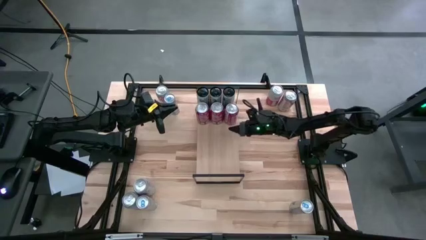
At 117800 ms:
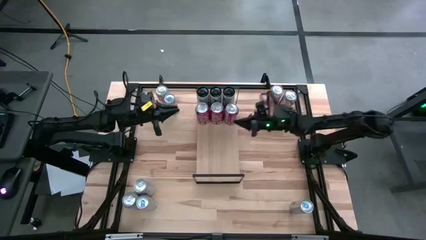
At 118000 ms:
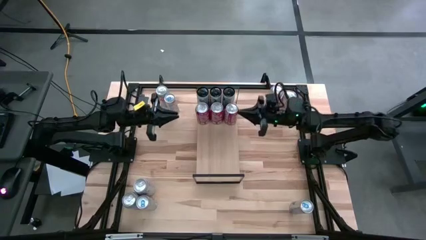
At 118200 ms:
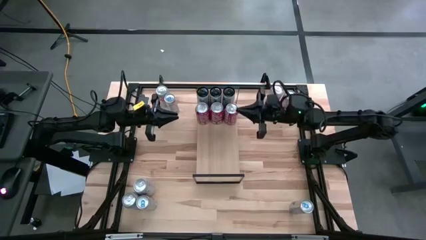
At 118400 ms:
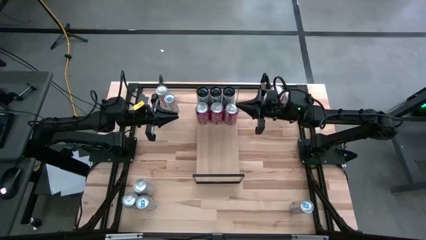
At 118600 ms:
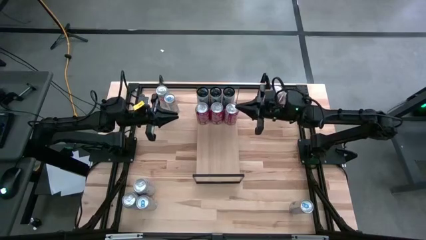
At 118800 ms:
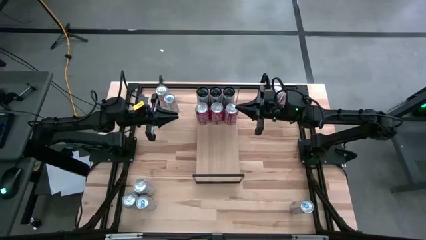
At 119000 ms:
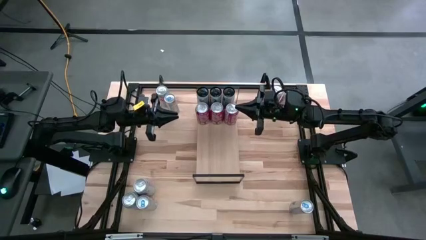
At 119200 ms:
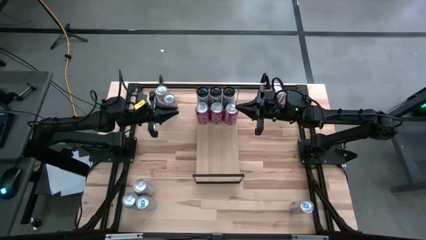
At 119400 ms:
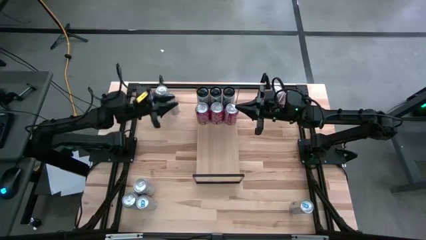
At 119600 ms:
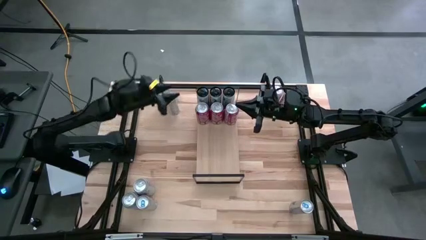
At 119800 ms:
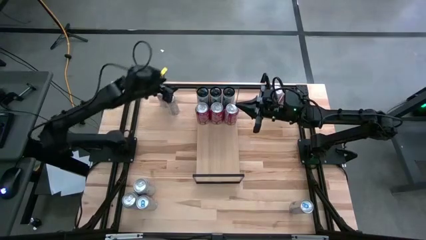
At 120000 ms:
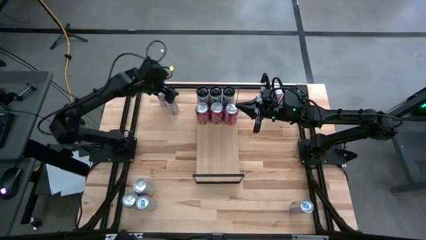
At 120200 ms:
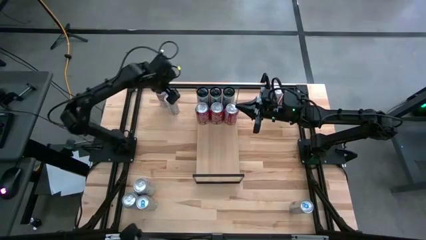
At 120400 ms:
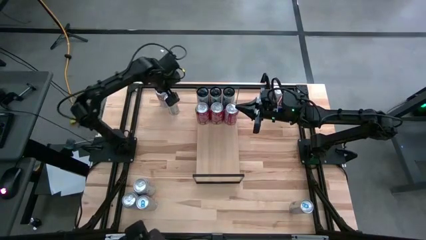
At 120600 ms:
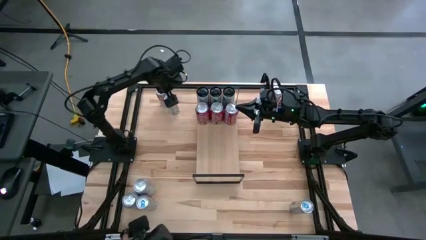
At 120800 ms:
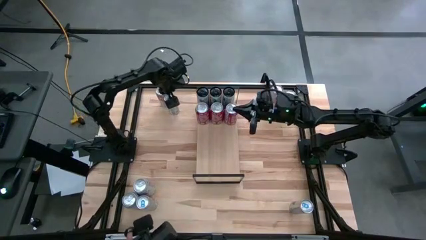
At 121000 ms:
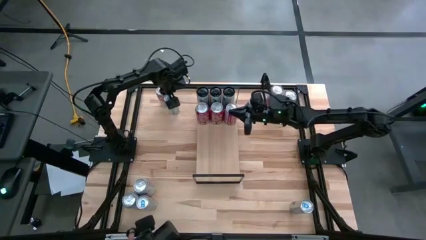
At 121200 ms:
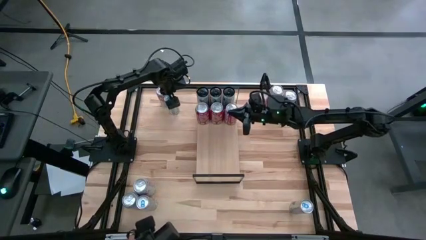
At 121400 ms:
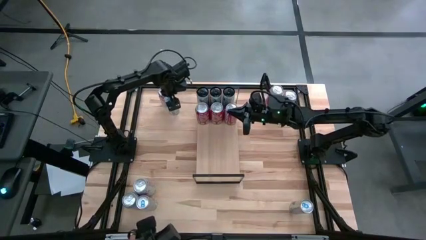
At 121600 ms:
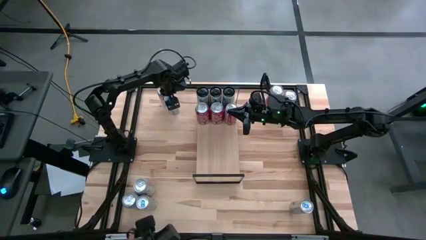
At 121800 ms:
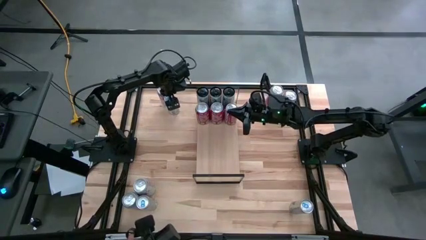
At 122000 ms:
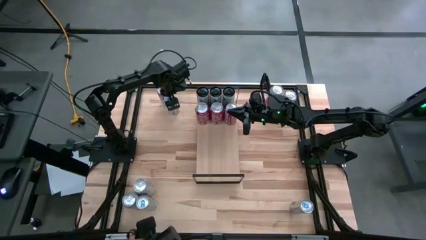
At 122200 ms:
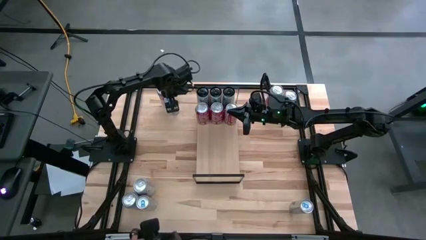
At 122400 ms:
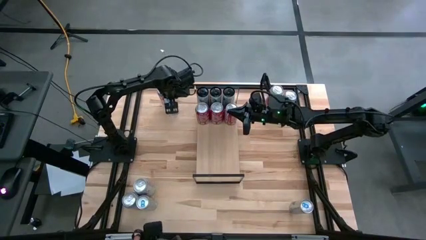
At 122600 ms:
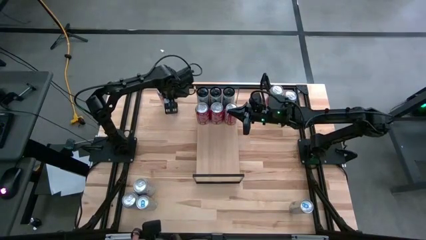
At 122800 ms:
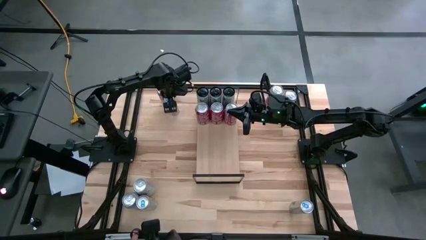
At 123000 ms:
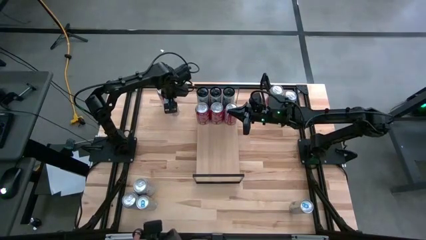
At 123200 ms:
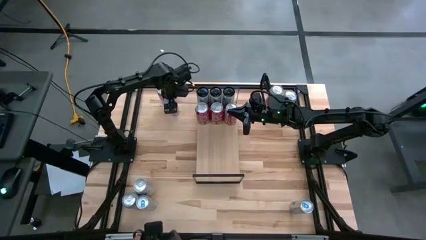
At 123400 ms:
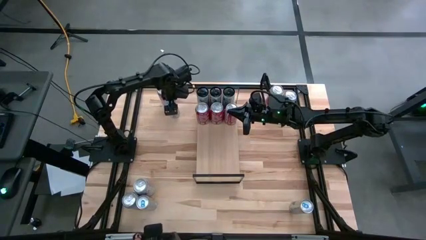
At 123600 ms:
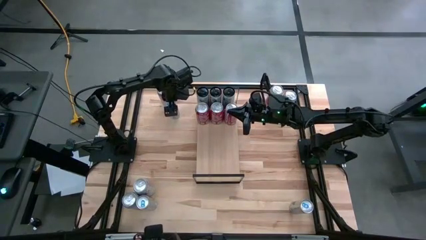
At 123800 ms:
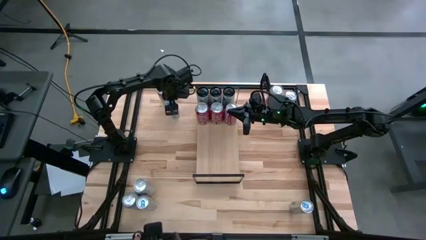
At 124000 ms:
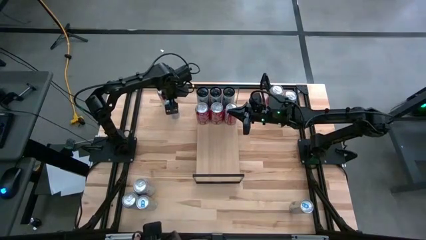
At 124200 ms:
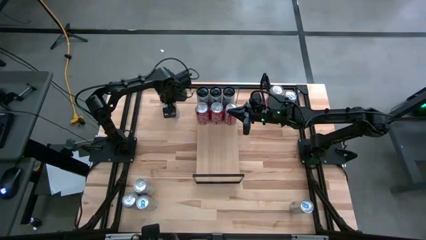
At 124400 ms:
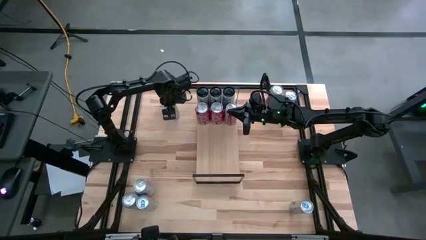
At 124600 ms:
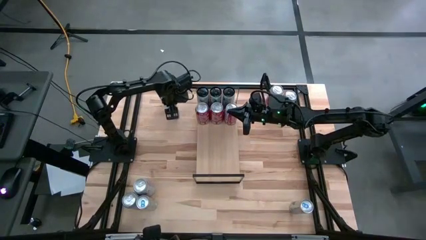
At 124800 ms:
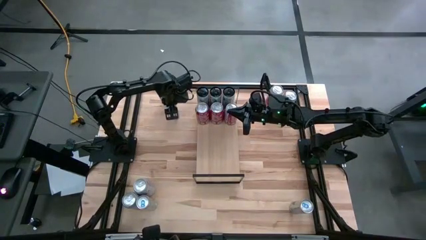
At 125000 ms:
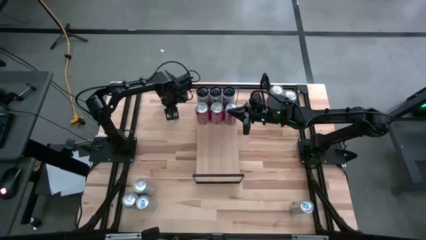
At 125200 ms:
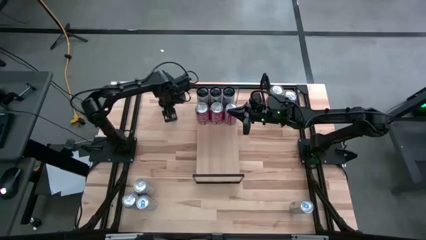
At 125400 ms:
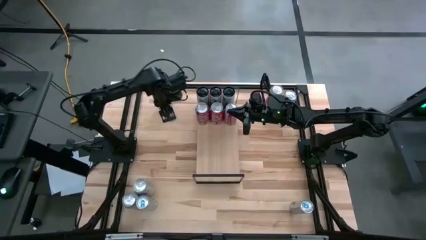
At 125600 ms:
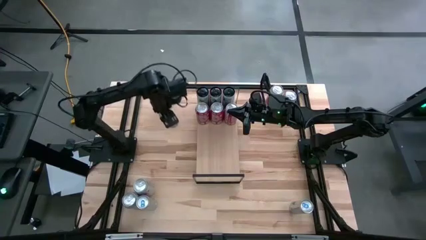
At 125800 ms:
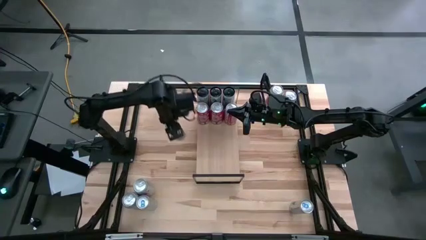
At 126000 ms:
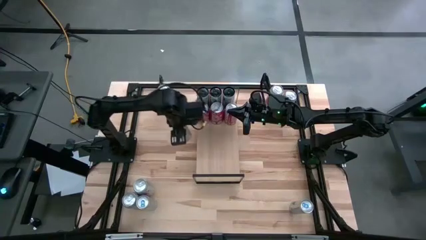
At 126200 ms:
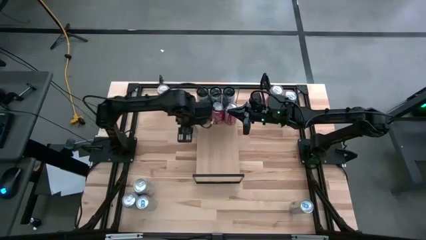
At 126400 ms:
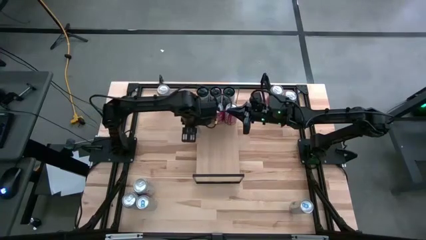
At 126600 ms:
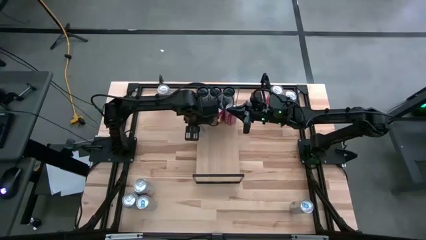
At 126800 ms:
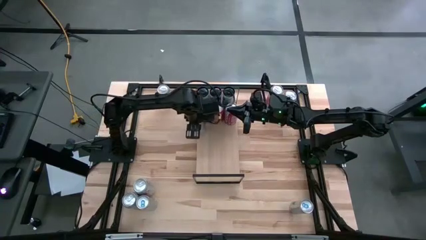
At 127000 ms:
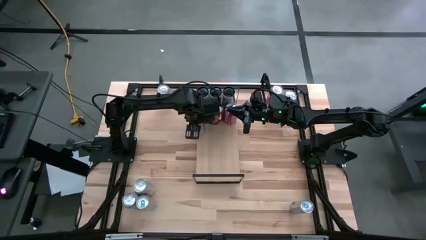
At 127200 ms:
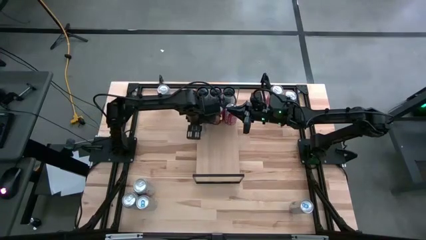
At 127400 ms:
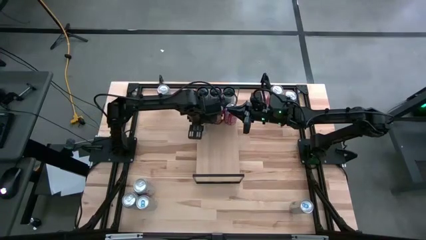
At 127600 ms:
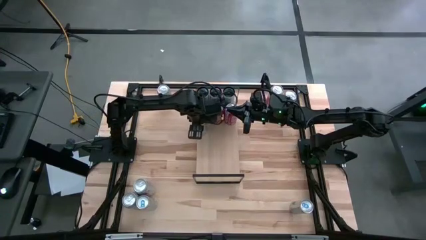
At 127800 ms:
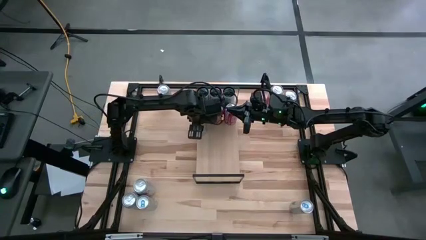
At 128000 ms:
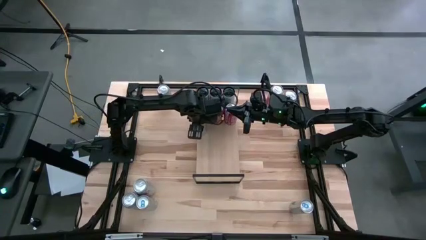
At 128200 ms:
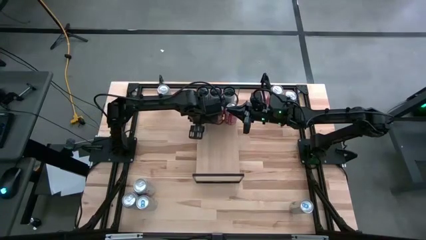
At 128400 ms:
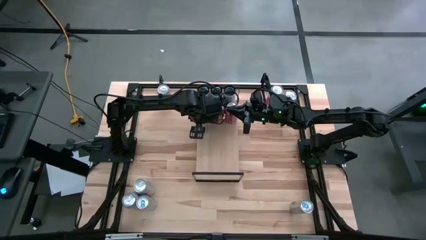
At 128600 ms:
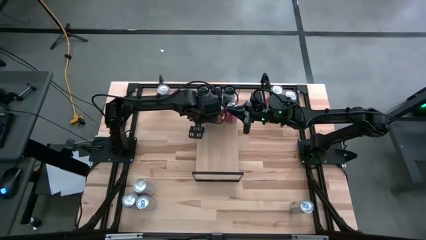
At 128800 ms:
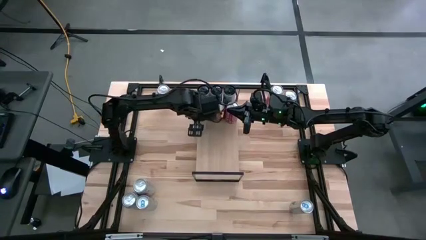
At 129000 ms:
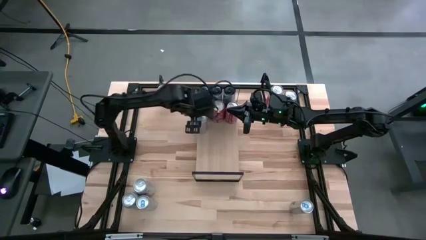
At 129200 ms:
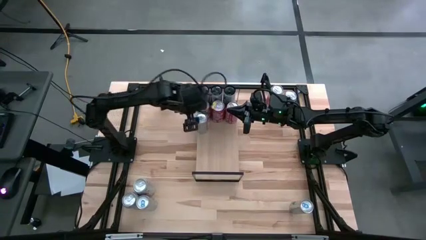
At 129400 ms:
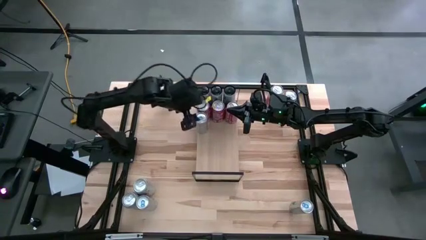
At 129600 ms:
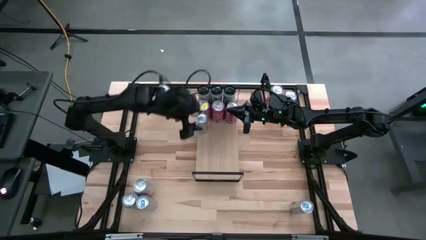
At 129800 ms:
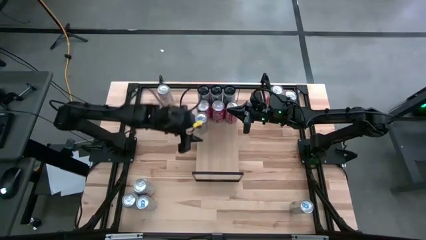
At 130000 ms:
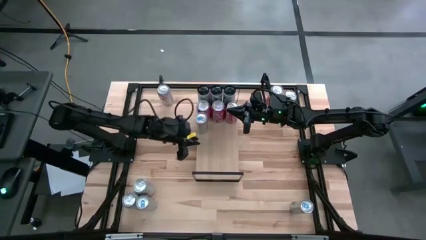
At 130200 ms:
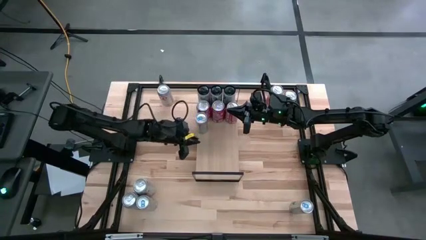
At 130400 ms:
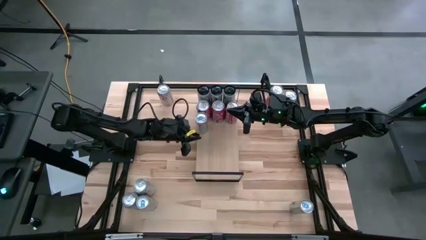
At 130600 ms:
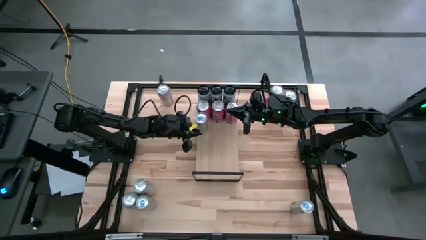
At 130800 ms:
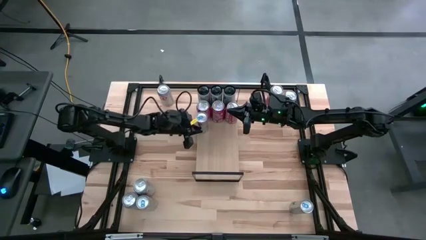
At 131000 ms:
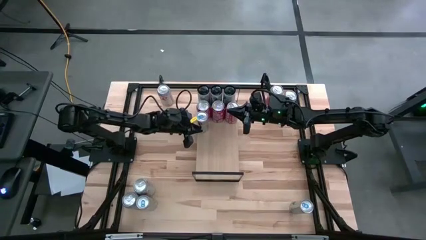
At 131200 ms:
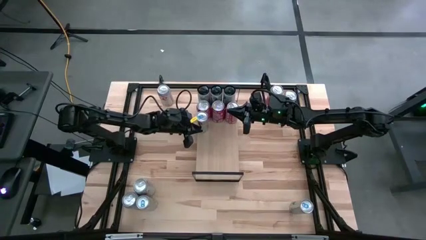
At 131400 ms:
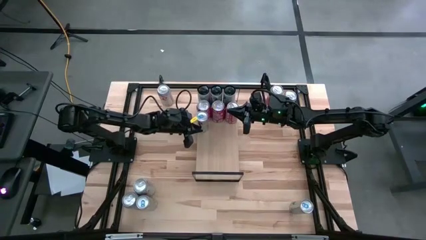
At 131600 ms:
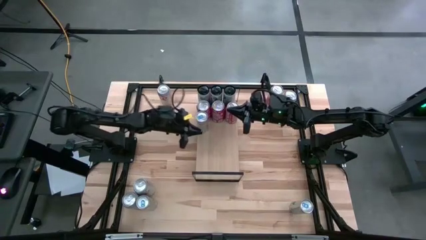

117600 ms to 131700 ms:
Task: Place canned beverage on shelf
Put the top left blue soda can on the shelf
